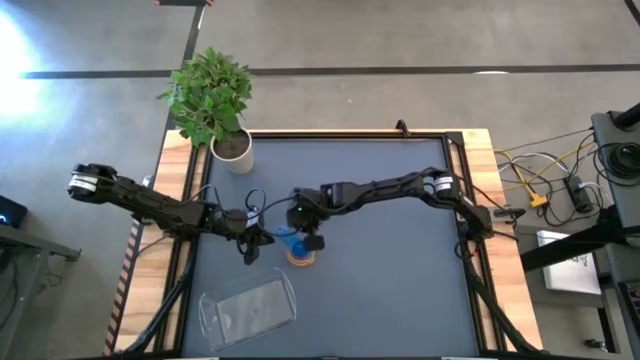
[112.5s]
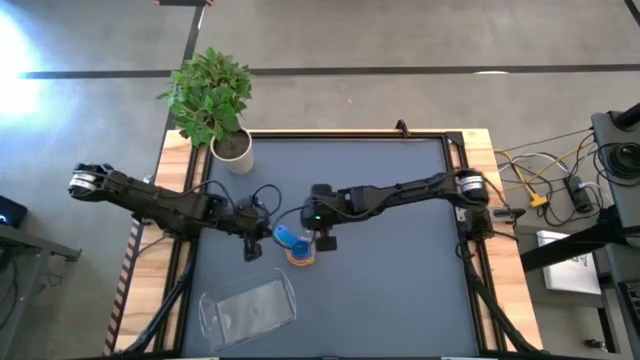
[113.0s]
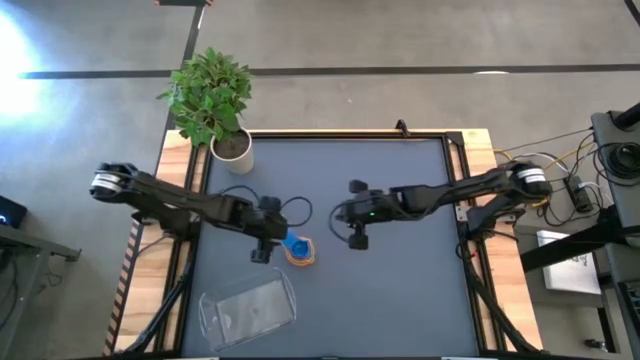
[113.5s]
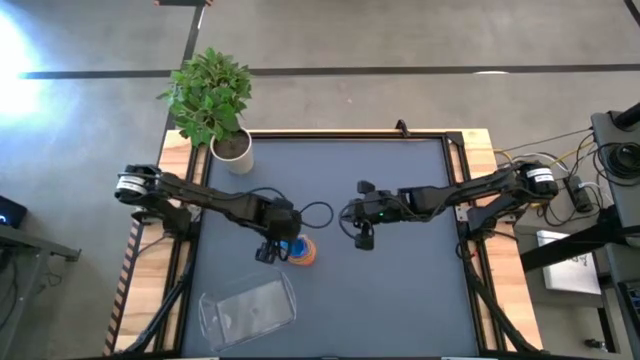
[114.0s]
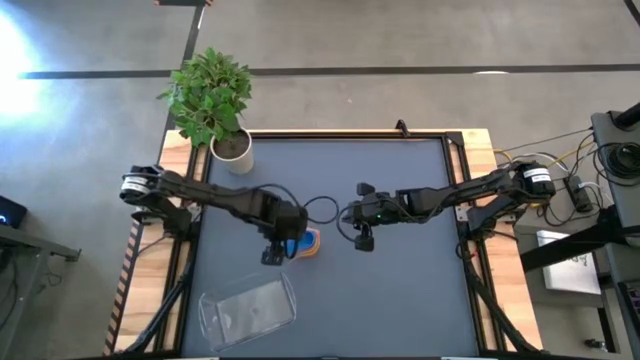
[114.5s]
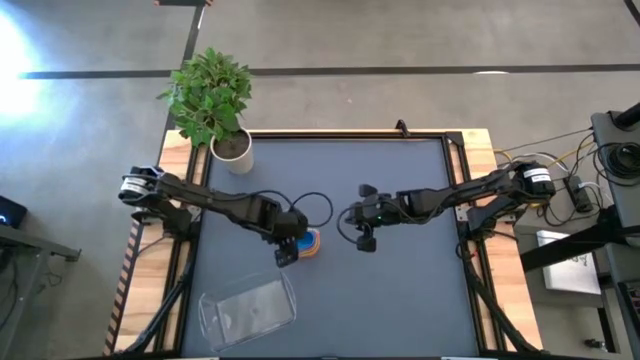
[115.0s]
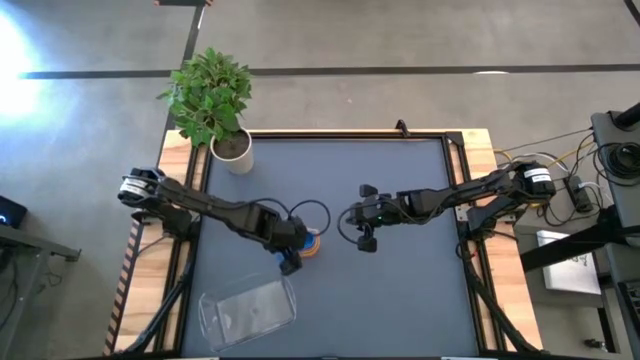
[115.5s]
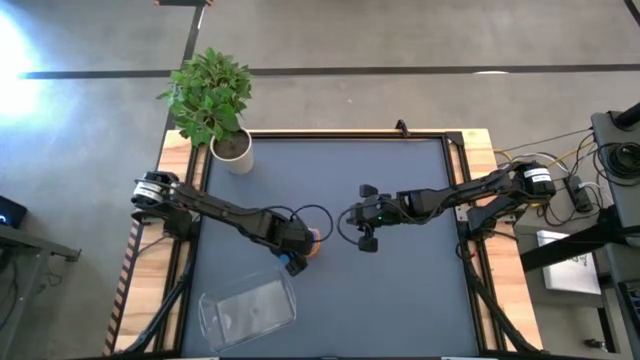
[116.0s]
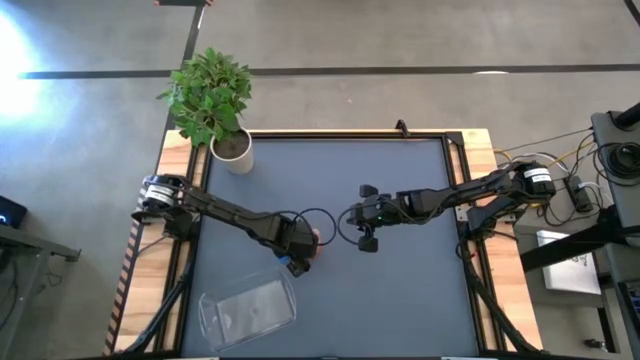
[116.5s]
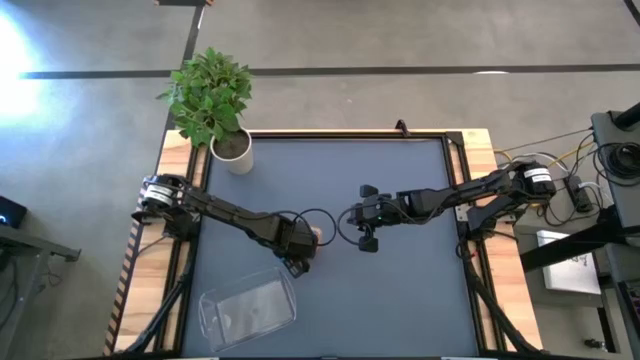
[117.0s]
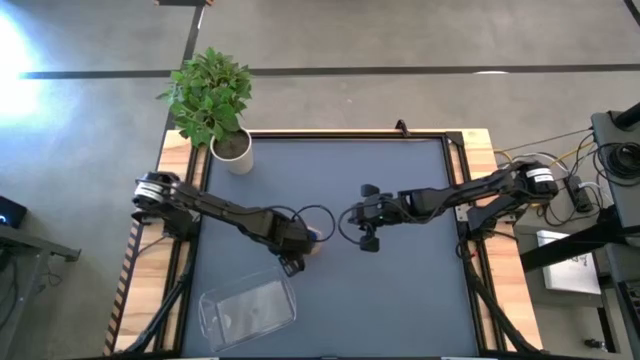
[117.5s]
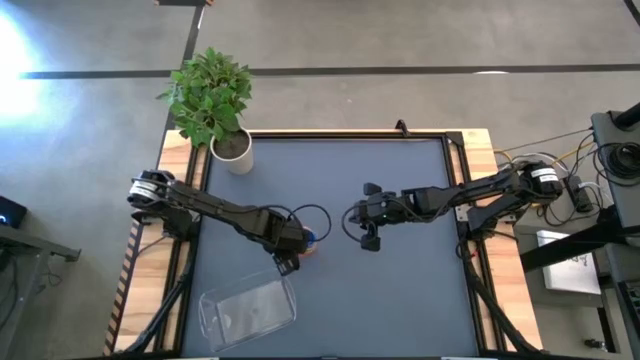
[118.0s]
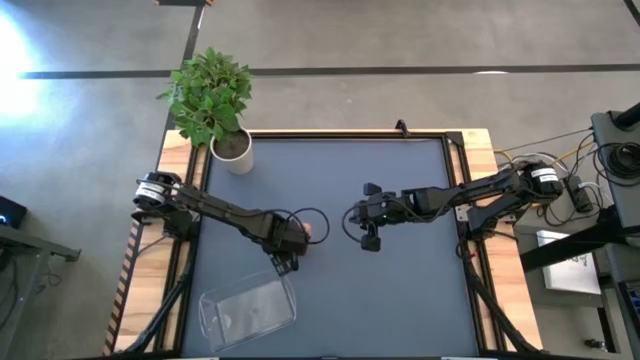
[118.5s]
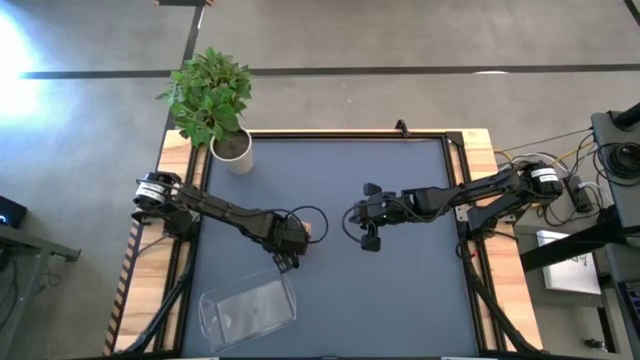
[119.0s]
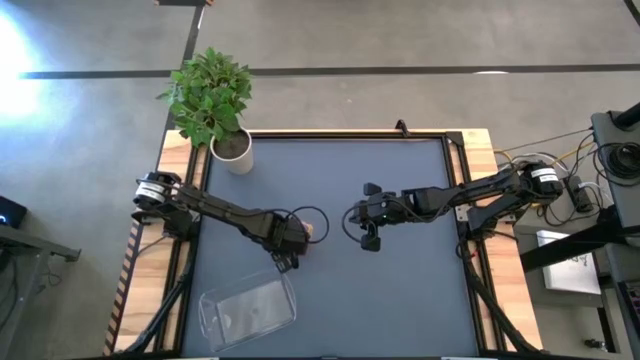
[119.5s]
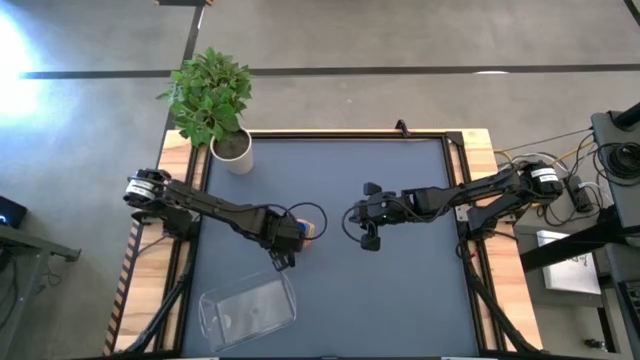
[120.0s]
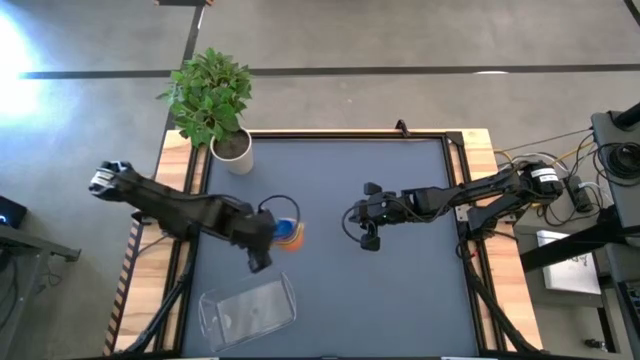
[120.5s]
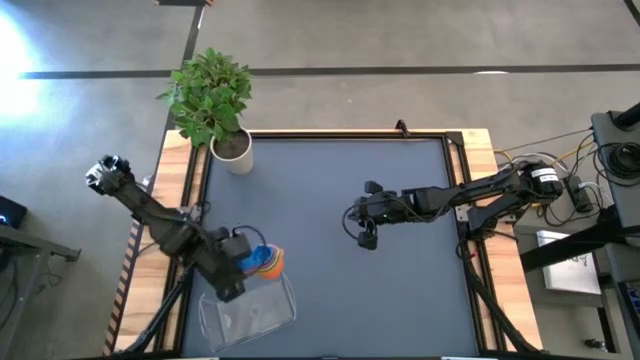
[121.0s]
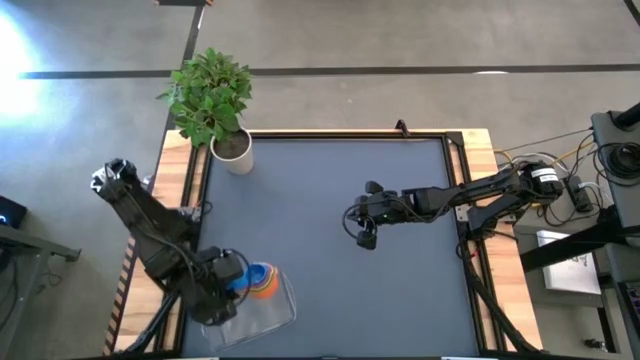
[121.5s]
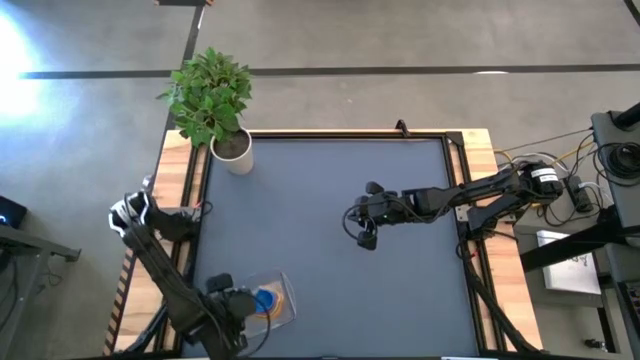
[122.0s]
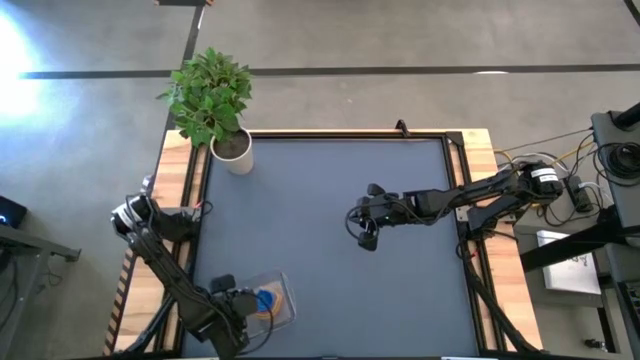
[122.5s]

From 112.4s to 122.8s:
Task: Nest measuring cups in basket
Put the stacked measuring cups into the bin

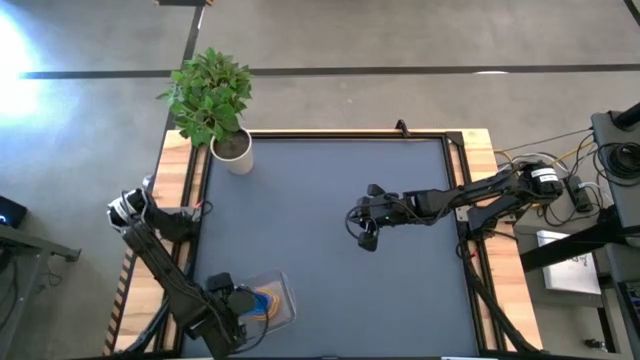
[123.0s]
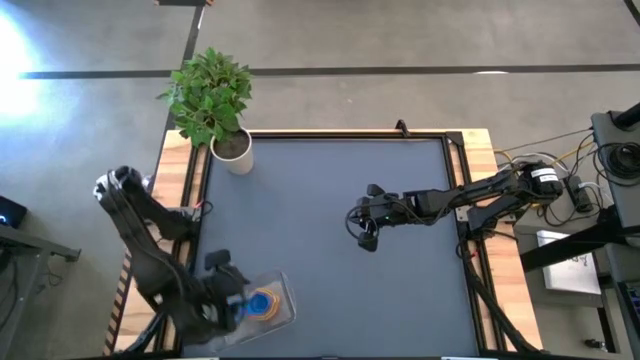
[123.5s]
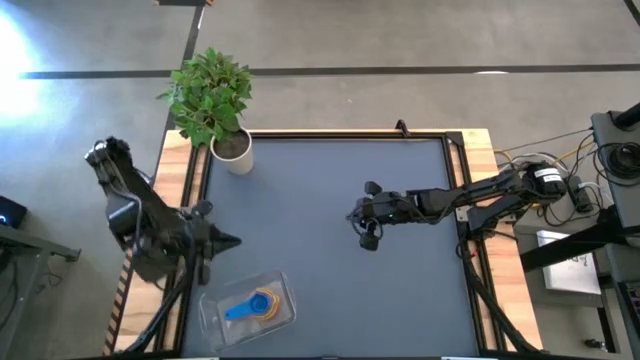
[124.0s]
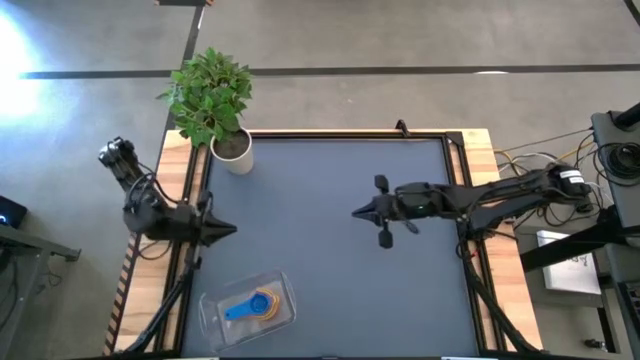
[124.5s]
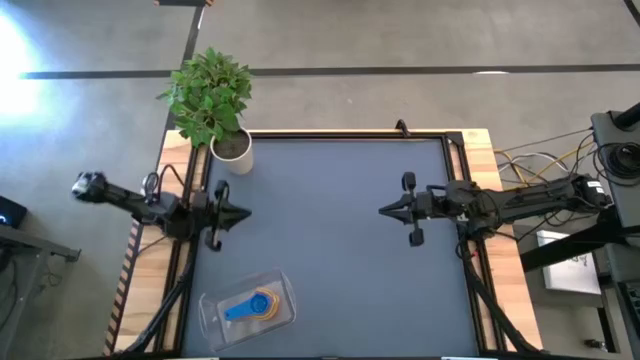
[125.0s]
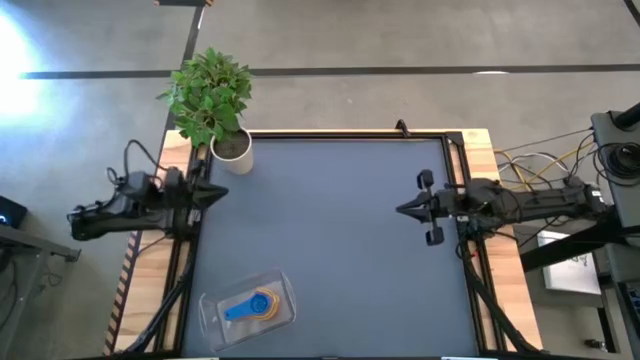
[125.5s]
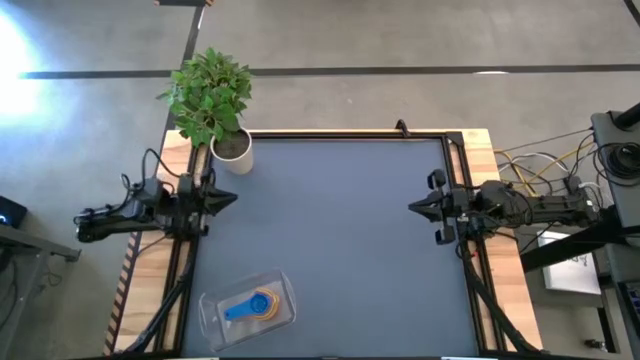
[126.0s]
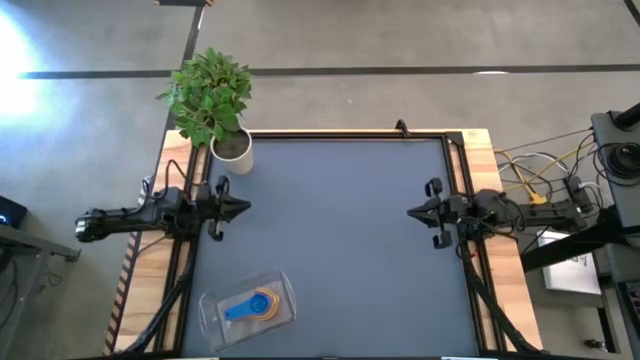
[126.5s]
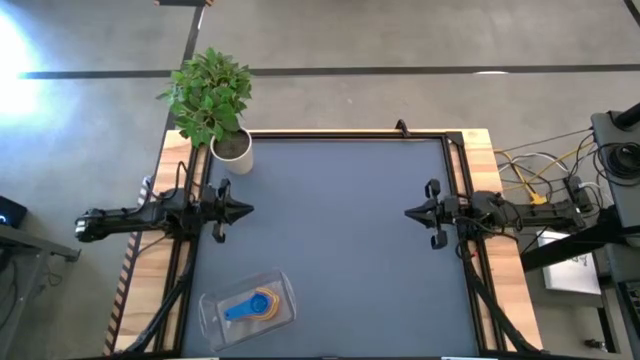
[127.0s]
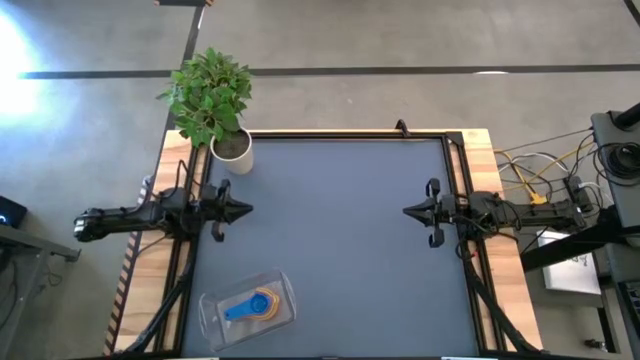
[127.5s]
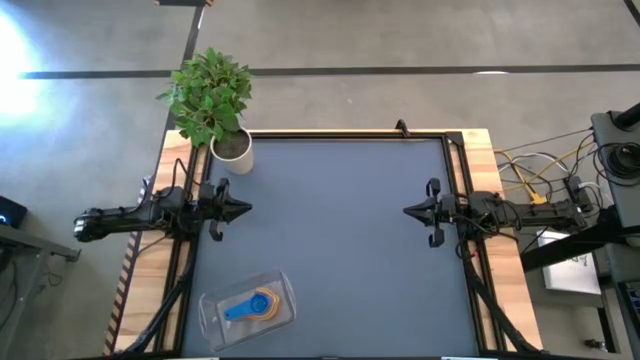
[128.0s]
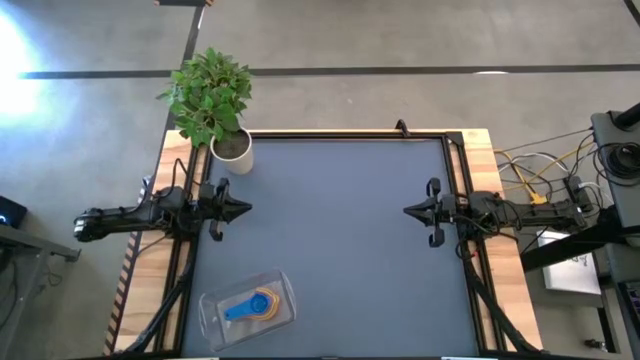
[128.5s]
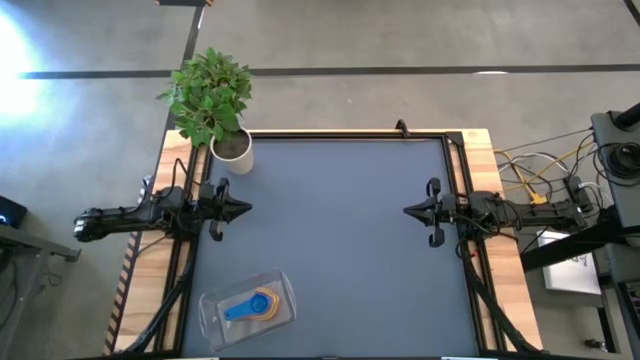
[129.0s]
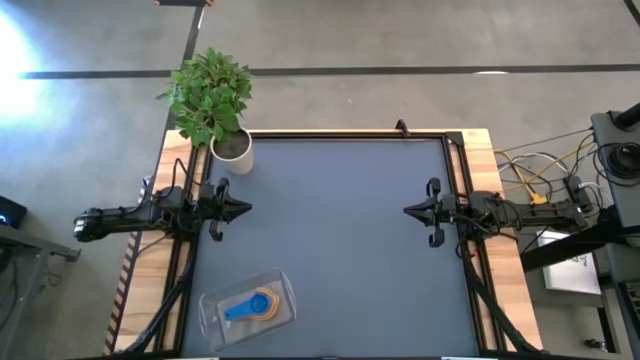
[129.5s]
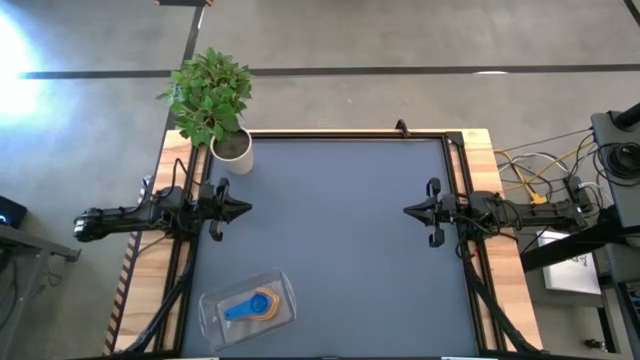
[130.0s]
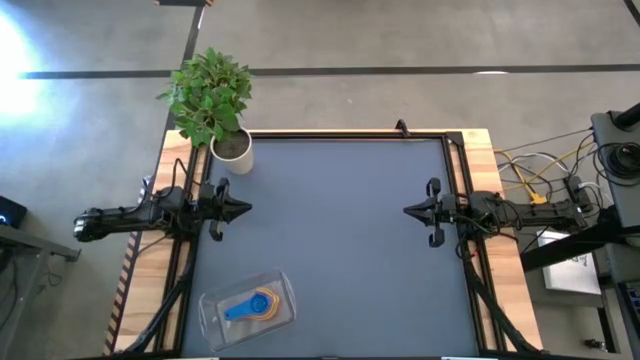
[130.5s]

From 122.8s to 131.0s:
Return to Home Position

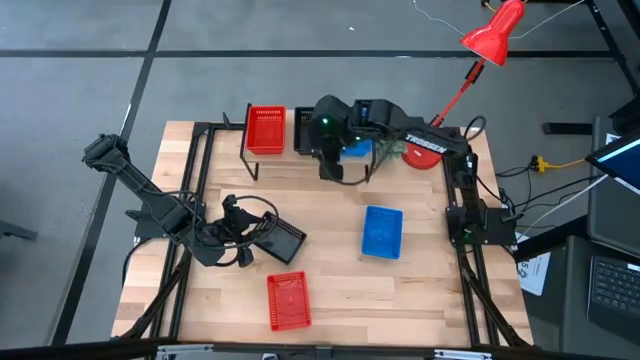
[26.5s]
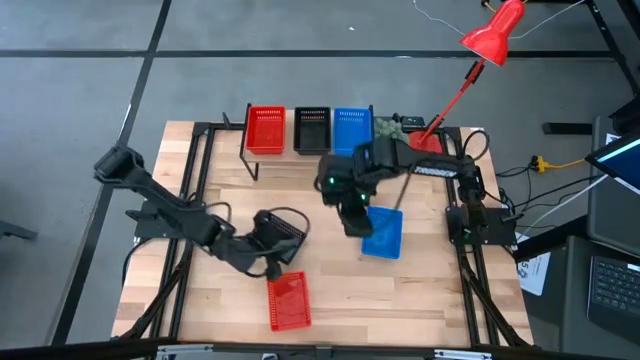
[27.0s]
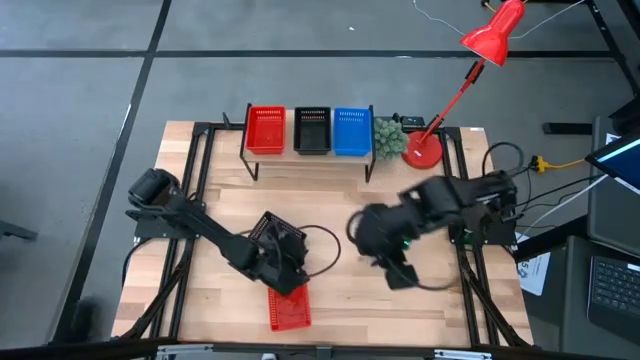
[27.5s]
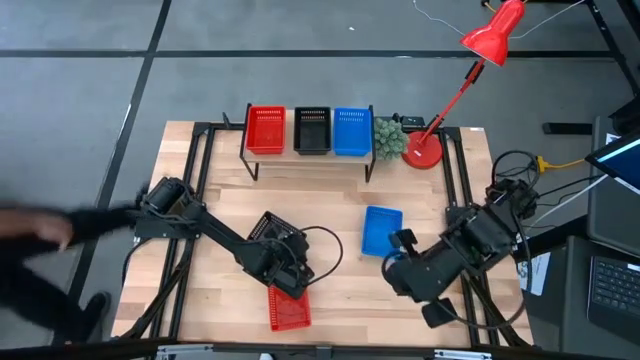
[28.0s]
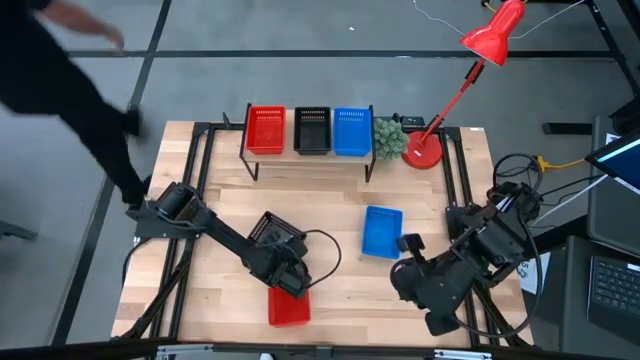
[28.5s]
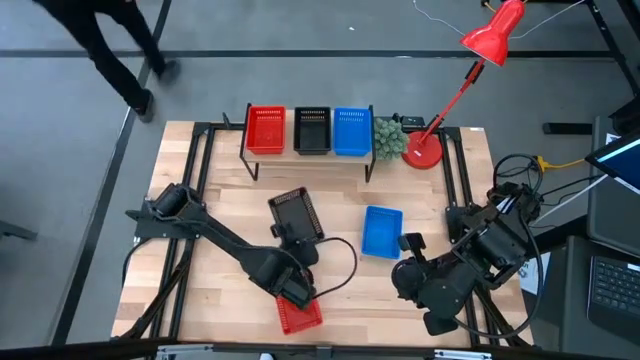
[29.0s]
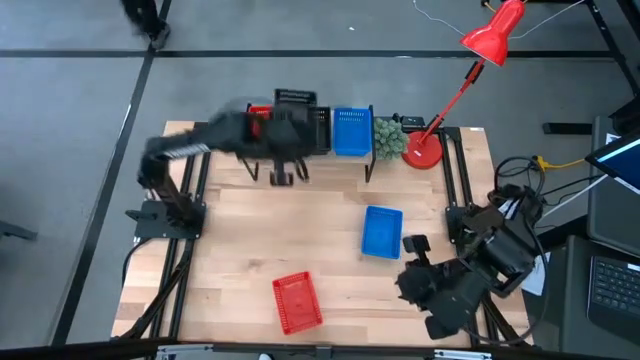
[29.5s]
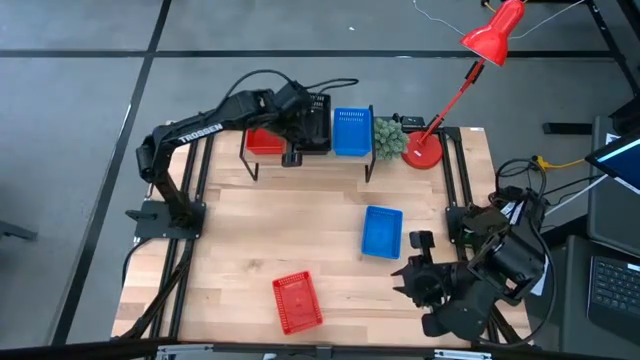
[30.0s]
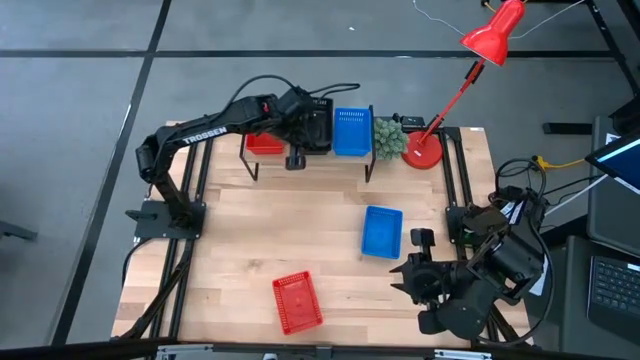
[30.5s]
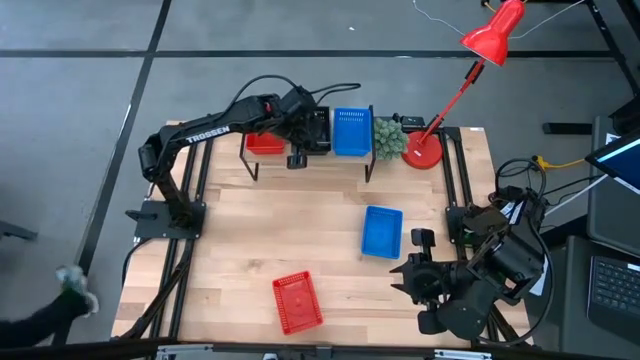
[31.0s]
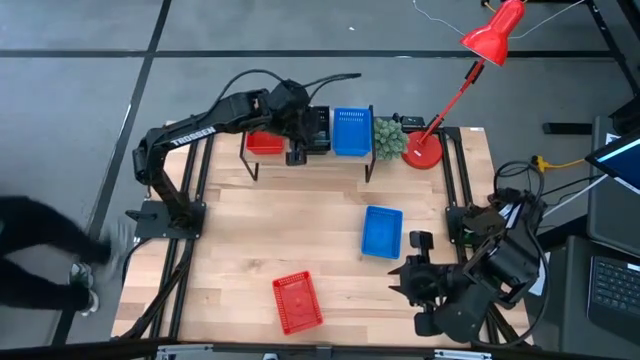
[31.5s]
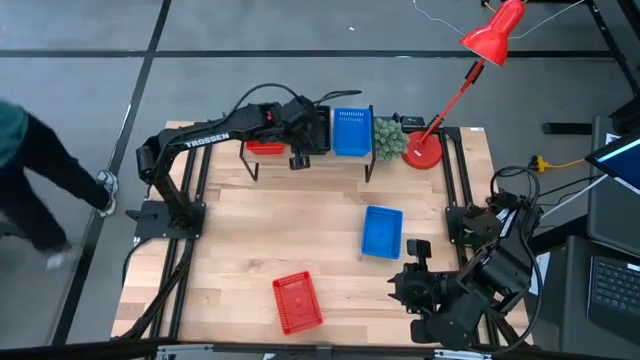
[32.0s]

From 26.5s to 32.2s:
Task: Stack baskets on shelf by color
Stack the black bin on top of the black bin on the shelf
